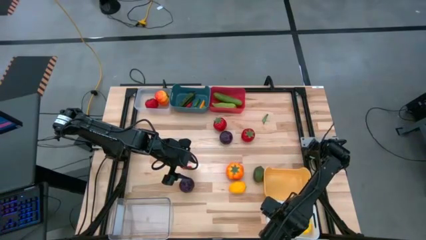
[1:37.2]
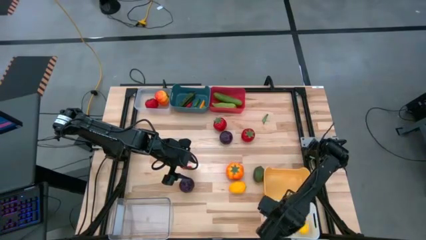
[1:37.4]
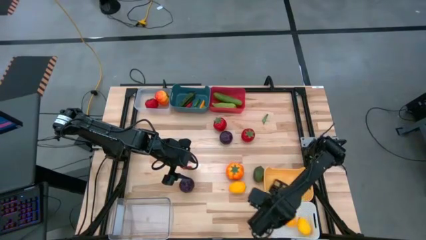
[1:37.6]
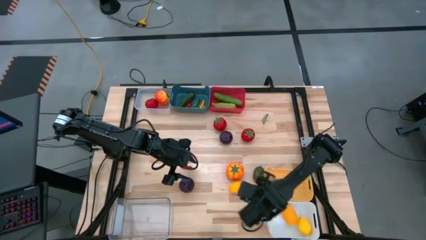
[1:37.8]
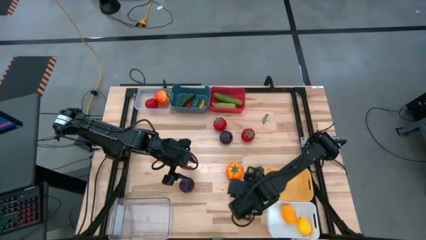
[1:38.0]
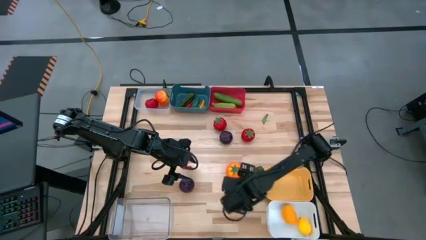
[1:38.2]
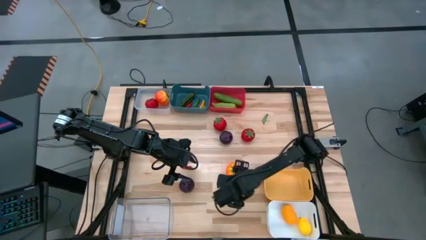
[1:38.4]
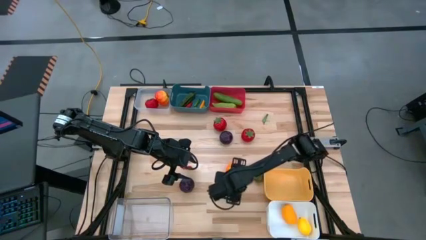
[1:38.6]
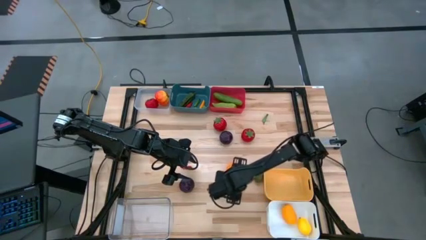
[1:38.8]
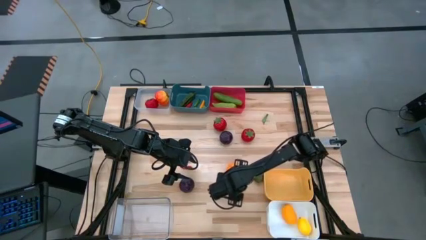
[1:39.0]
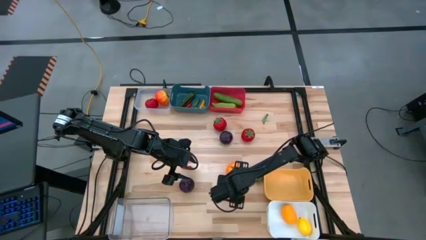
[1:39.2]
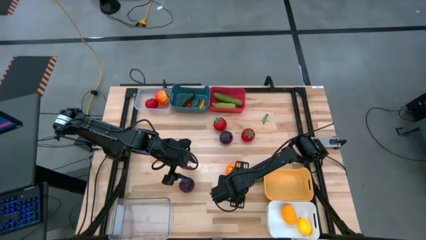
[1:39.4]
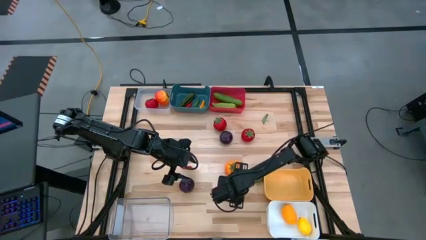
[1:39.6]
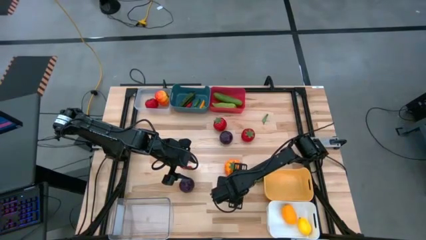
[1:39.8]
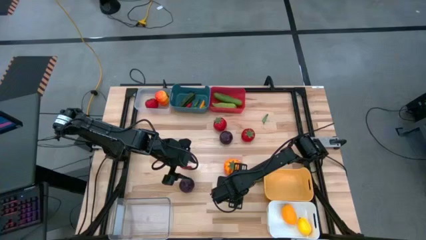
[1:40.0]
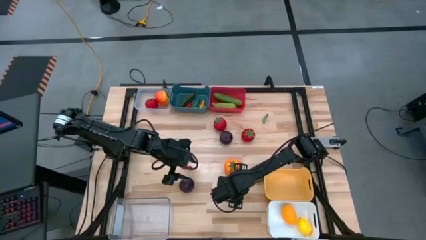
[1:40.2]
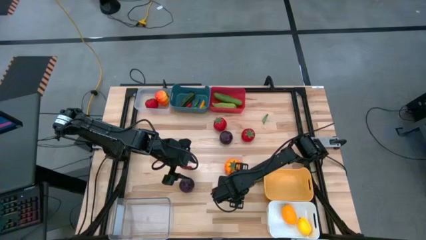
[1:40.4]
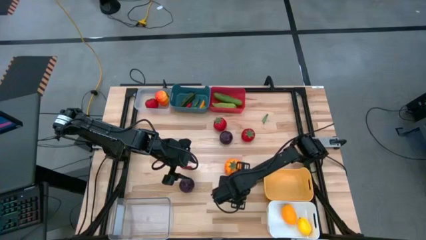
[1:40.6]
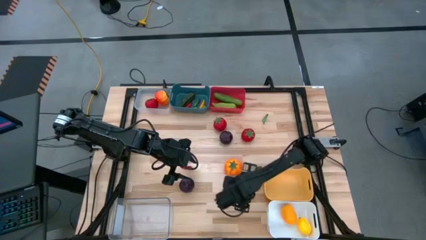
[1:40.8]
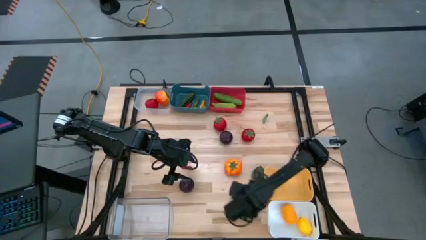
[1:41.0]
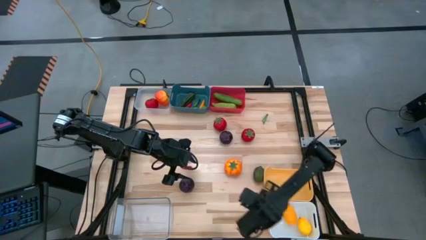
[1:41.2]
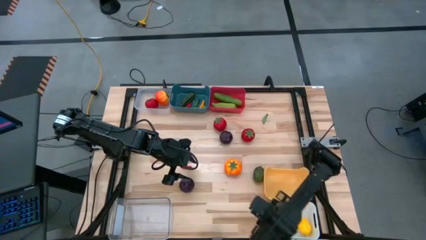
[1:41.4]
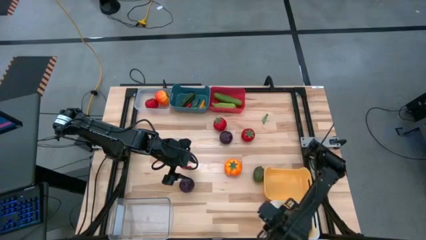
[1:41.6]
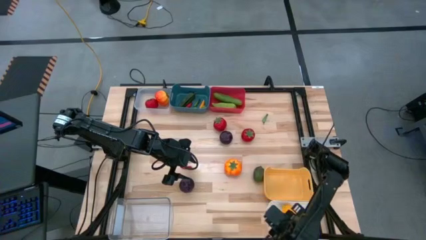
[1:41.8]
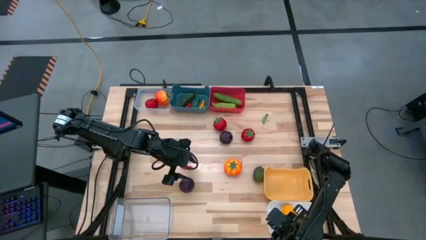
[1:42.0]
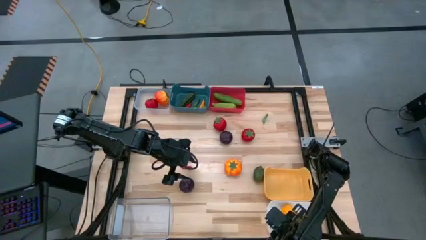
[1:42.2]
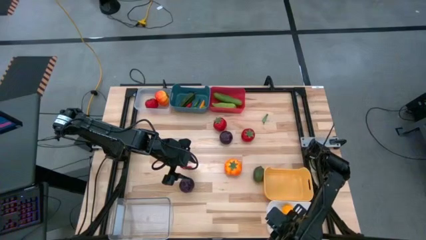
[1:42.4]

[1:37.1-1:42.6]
Task: Sort produce into baskets
Put the lemon into the white bin

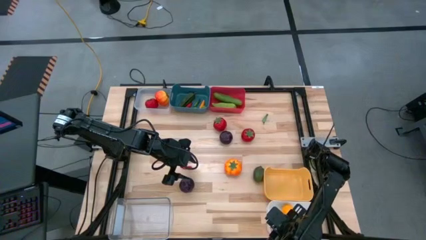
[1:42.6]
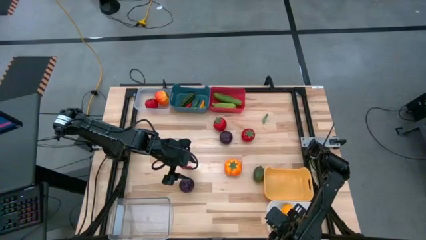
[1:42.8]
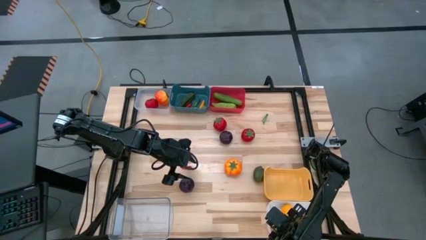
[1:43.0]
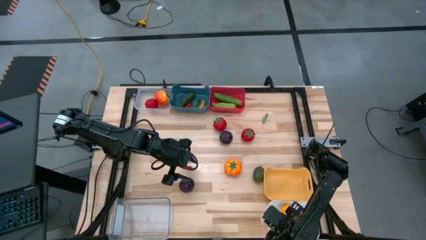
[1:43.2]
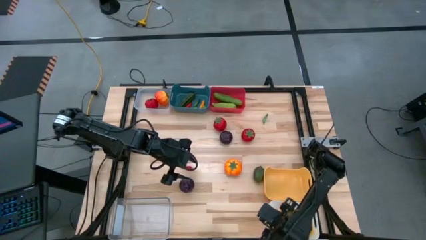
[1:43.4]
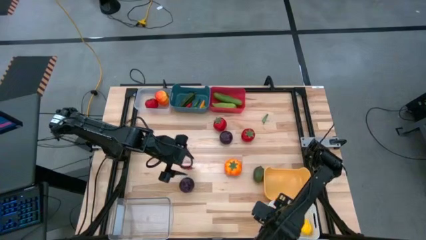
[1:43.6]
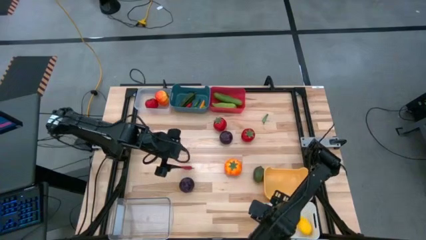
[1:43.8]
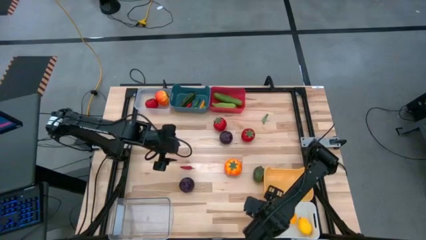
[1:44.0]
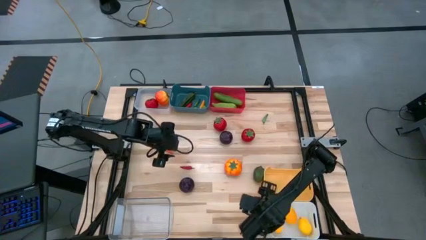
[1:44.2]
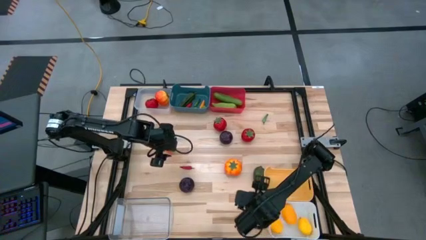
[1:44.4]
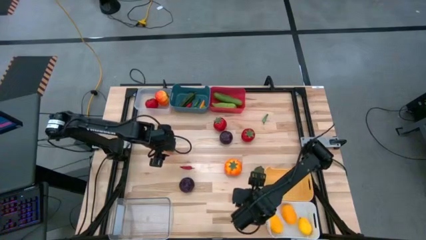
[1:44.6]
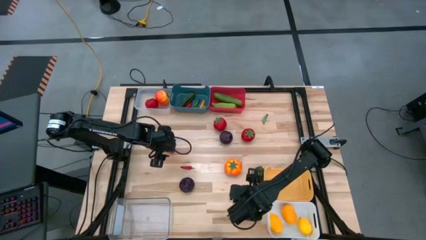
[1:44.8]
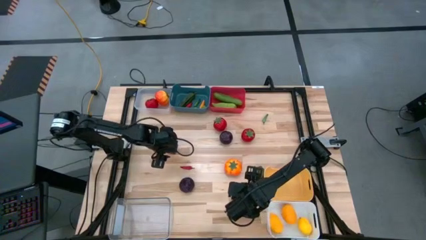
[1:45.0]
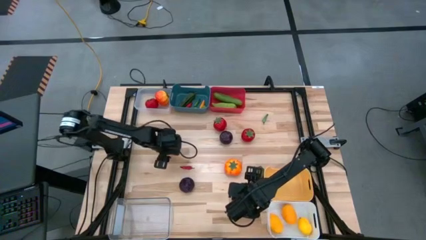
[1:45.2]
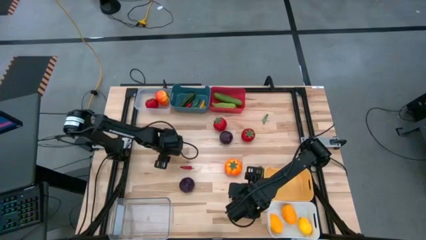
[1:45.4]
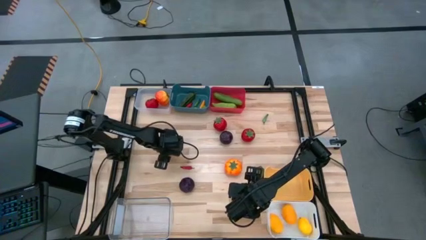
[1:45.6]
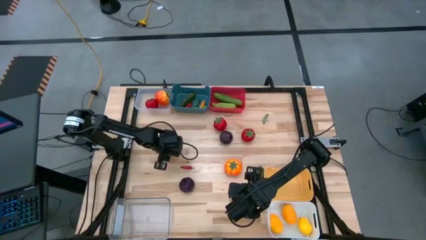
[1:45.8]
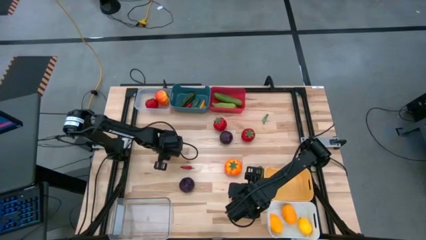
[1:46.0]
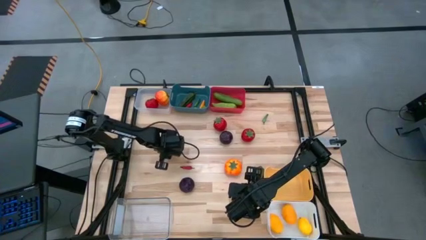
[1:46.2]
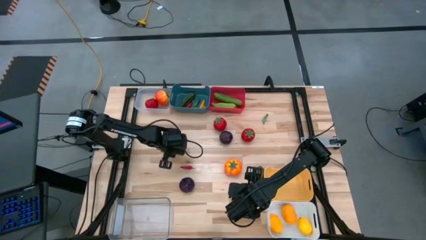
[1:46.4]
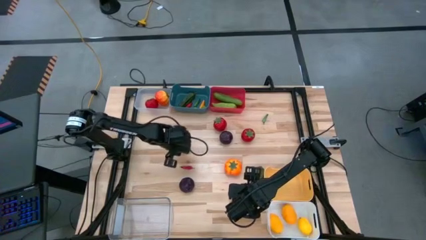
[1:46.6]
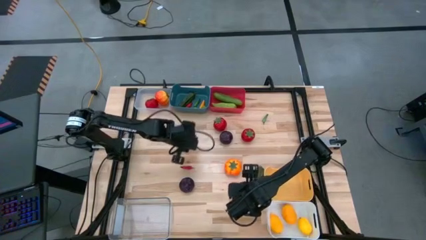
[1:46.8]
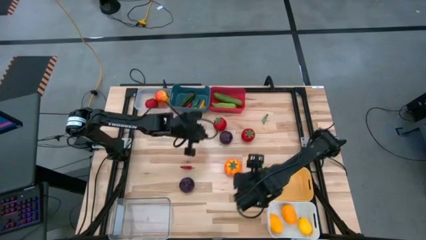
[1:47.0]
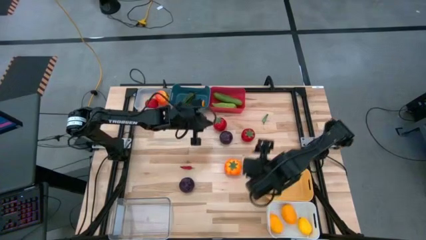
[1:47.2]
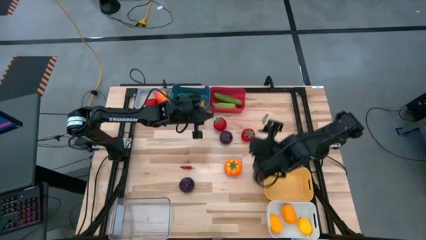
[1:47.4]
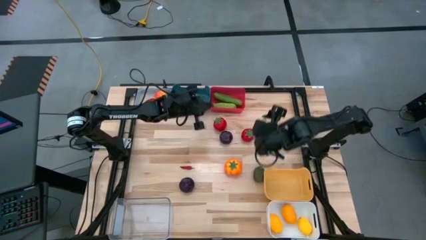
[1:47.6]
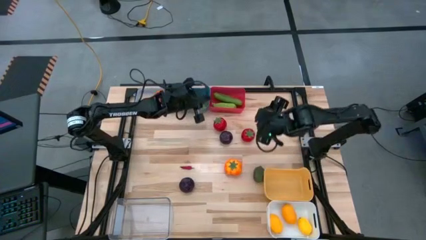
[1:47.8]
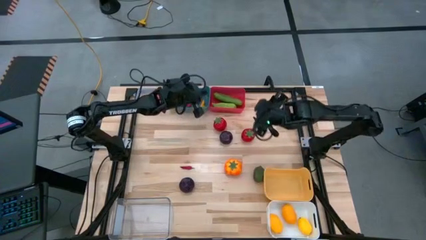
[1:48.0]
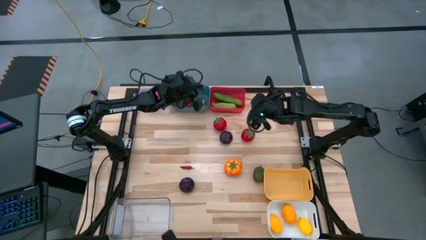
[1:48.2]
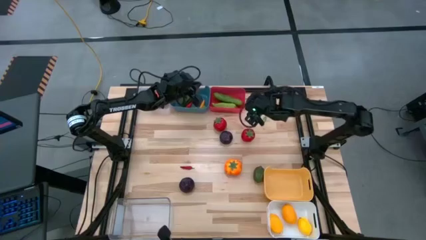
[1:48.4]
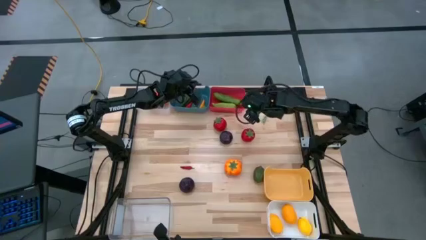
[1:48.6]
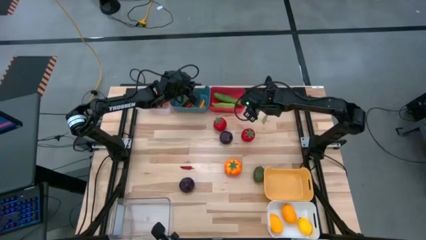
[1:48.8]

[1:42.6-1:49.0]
Put the orange chili pepper into the blue bin

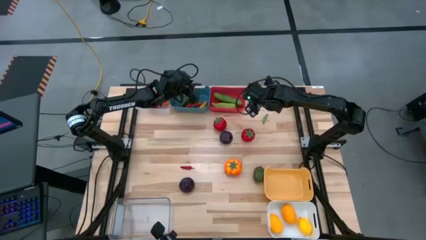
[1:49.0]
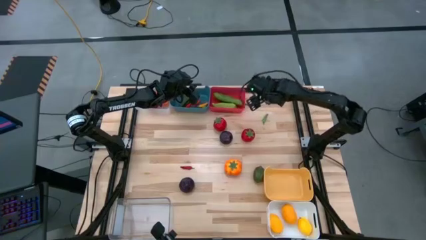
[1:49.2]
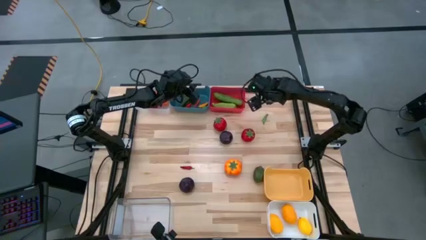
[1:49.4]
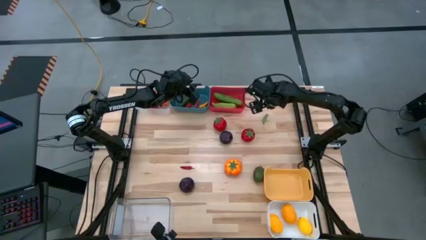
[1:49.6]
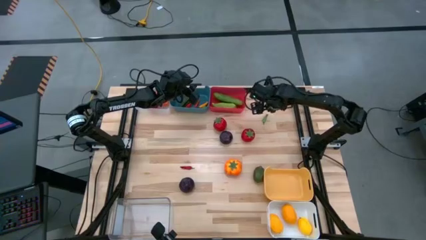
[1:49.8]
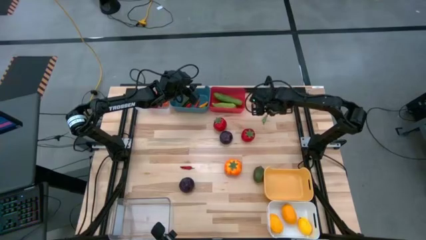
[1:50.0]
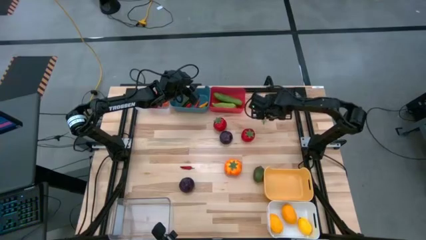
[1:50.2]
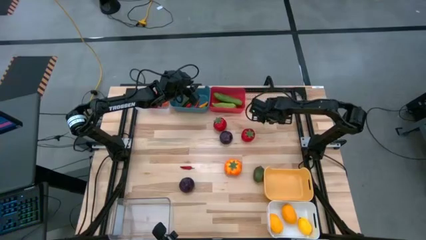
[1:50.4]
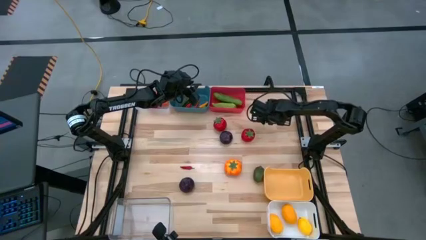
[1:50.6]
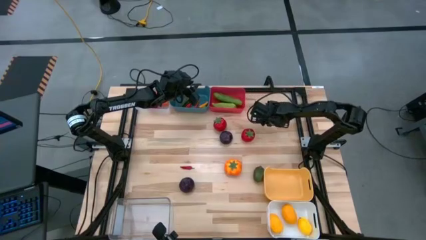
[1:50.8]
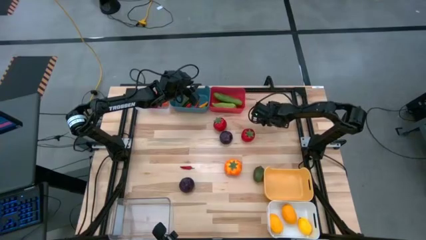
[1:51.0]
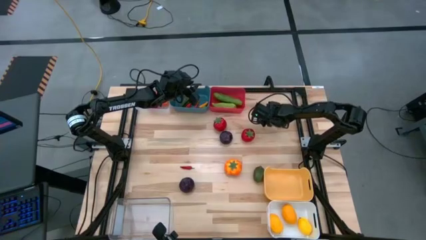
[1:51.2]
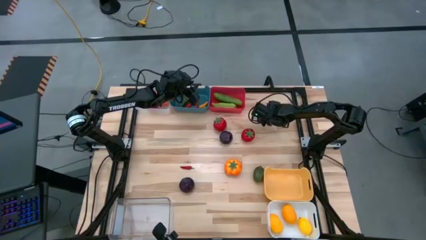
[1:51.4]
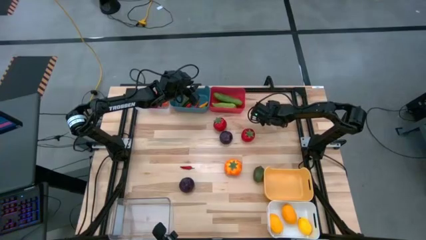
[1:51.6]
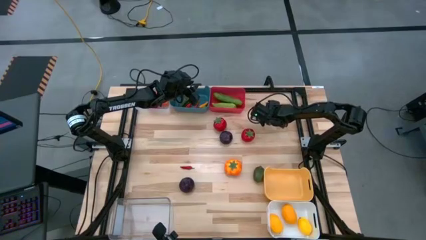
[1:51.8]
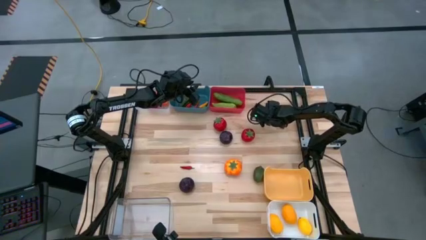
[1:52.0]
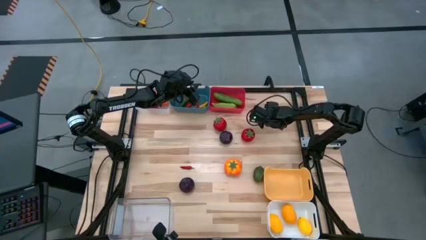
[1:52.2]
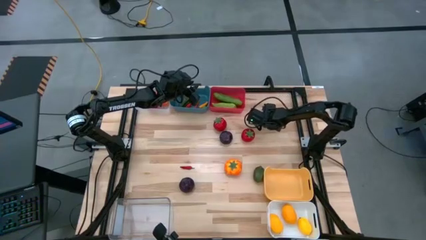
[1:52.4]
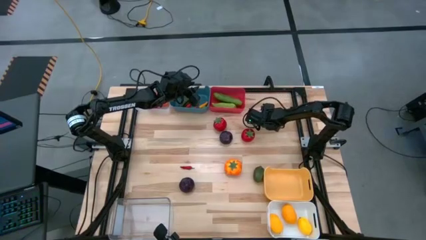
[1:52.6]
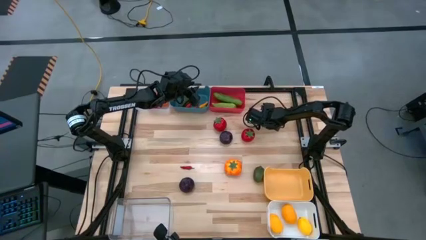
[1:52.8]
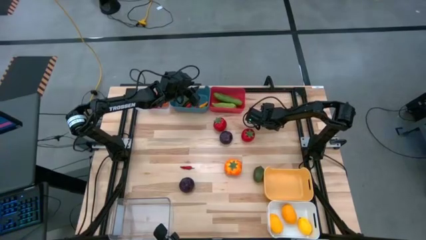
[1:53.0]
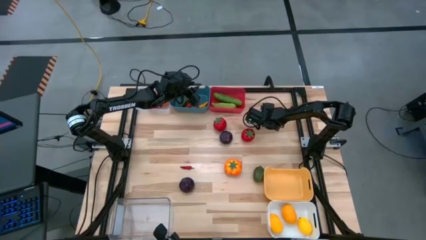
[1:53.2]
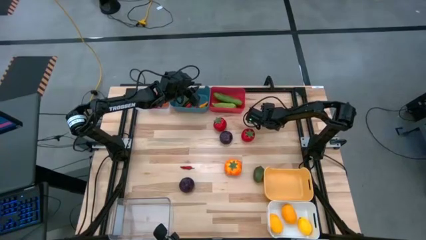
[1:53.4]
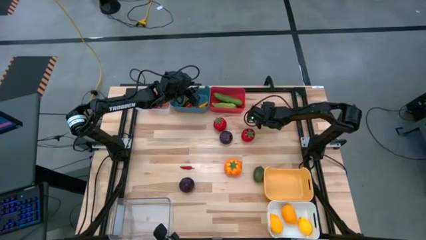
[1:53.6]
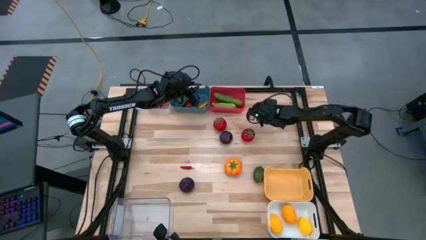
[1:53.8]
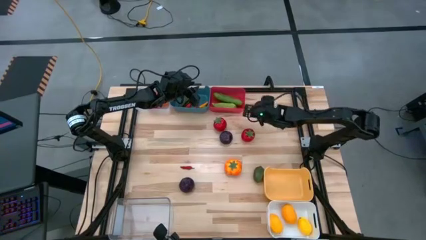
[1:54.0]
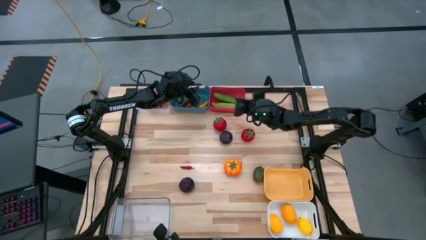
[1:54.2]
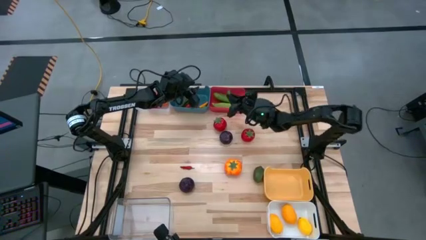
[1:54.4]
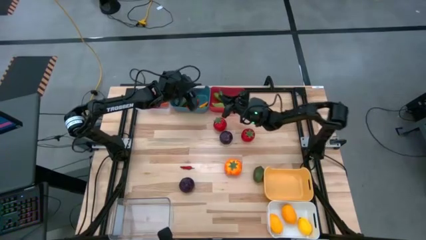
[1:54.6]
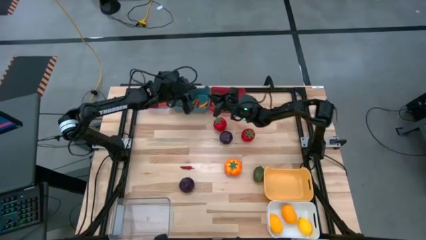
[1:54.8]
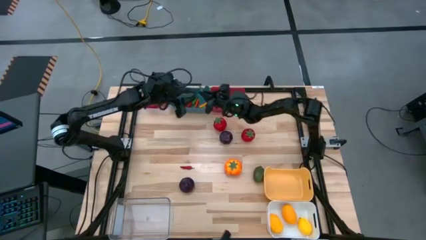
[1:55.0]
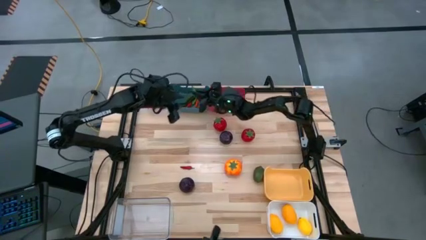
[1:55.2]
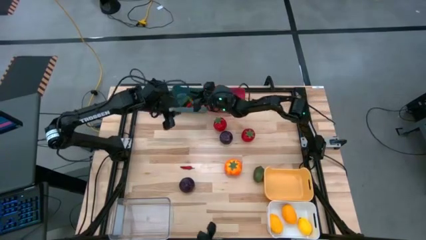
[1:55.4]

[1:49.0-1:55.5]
Put the green chili pepper into the blue bin
